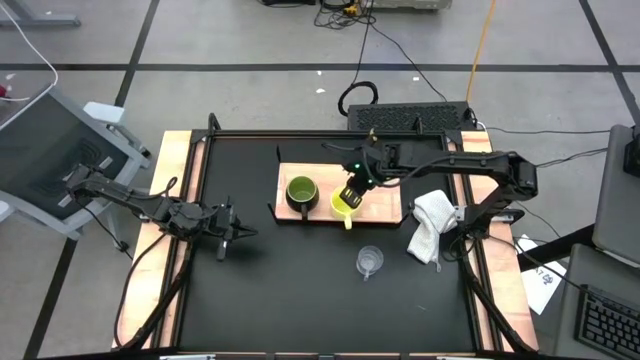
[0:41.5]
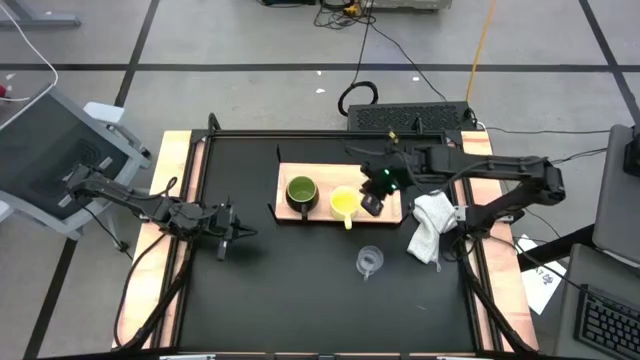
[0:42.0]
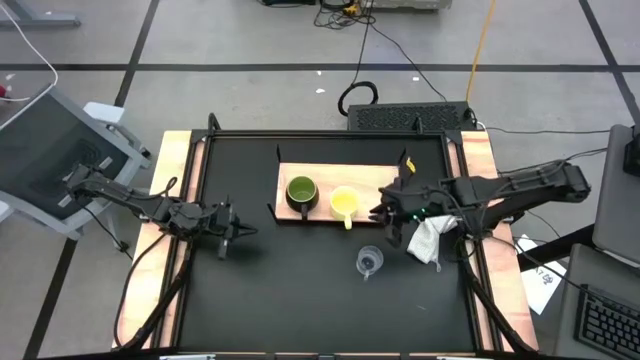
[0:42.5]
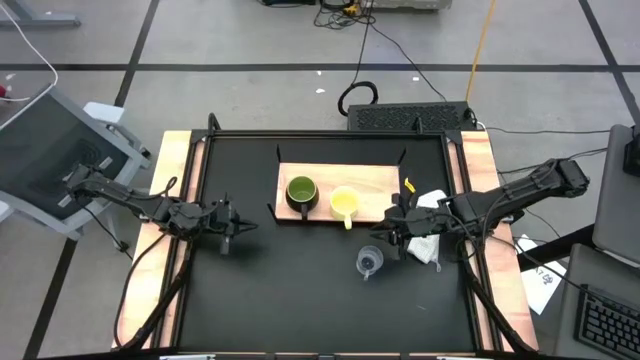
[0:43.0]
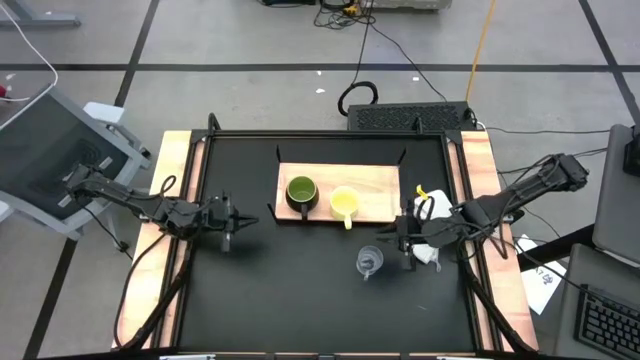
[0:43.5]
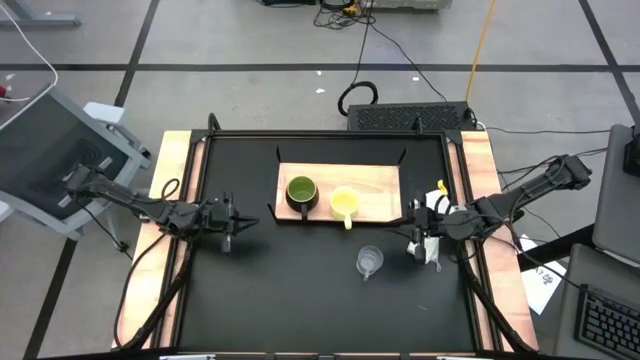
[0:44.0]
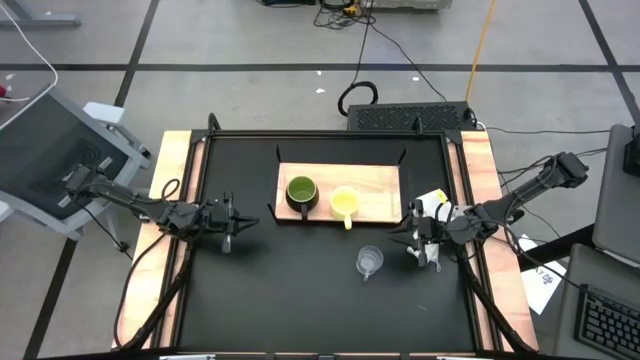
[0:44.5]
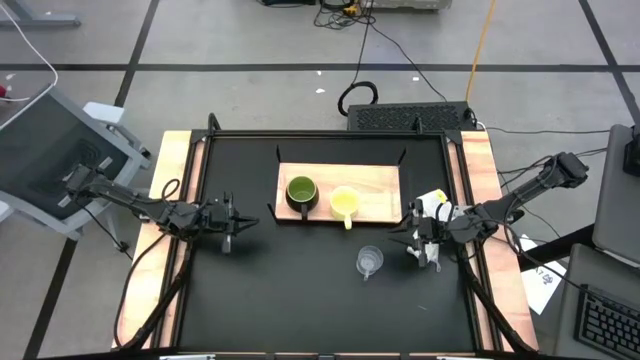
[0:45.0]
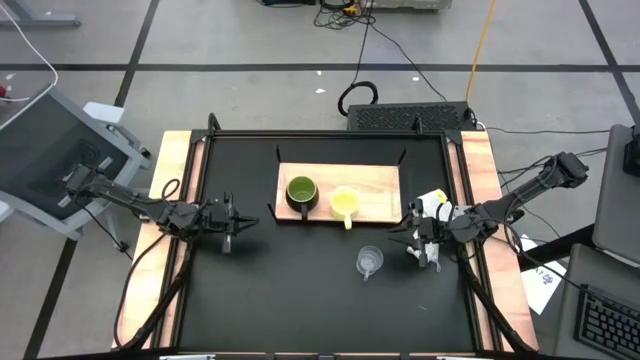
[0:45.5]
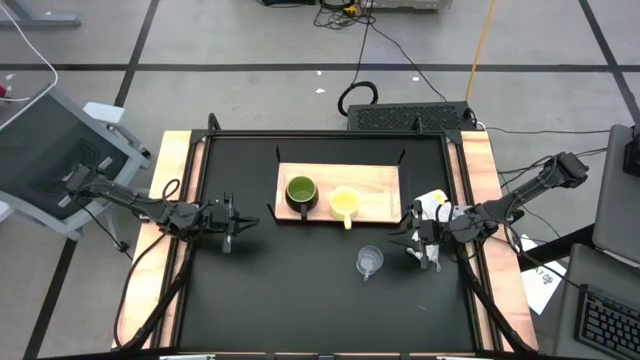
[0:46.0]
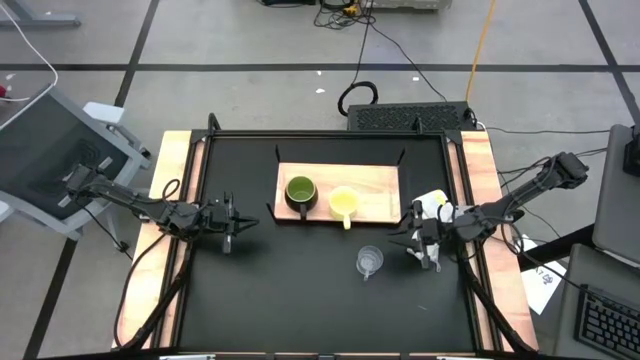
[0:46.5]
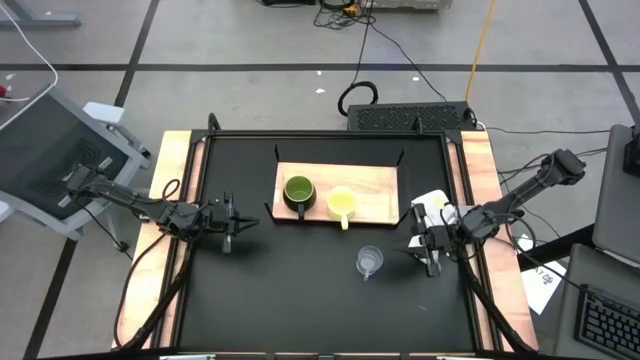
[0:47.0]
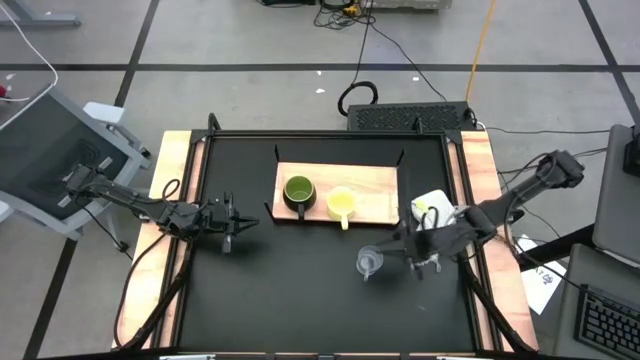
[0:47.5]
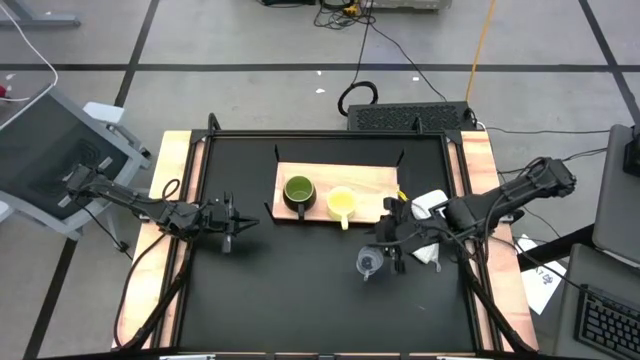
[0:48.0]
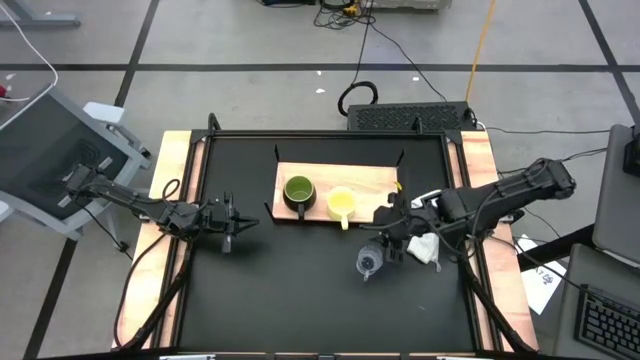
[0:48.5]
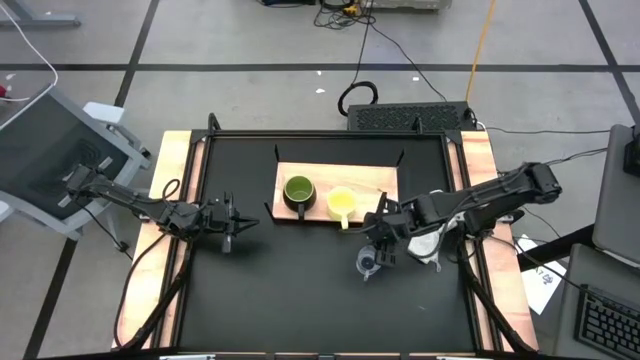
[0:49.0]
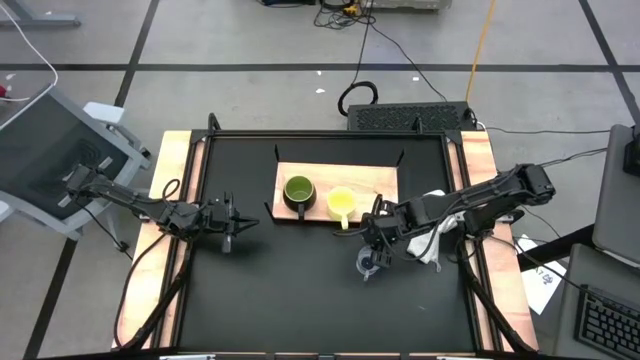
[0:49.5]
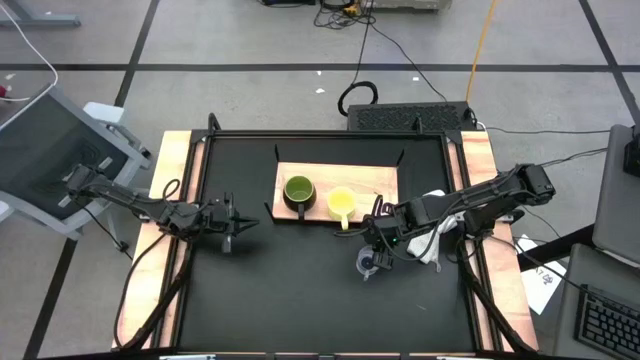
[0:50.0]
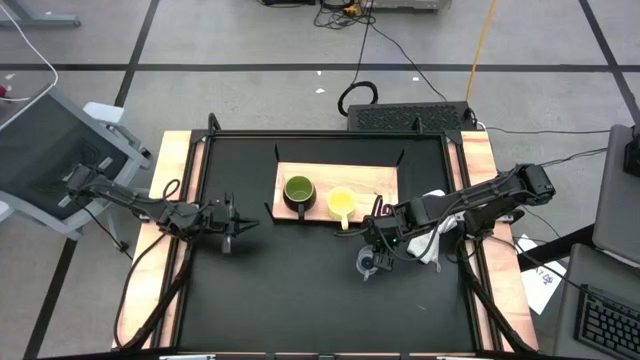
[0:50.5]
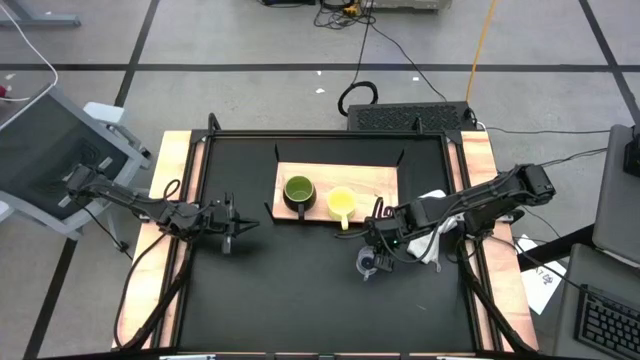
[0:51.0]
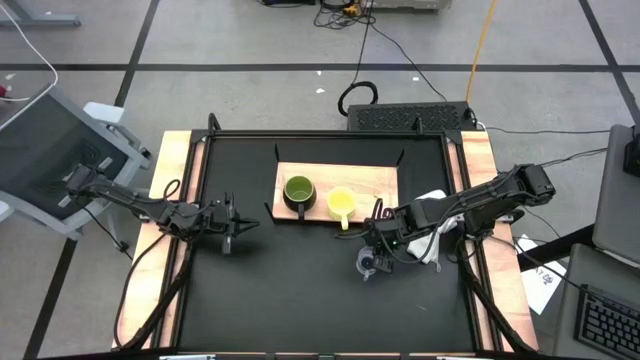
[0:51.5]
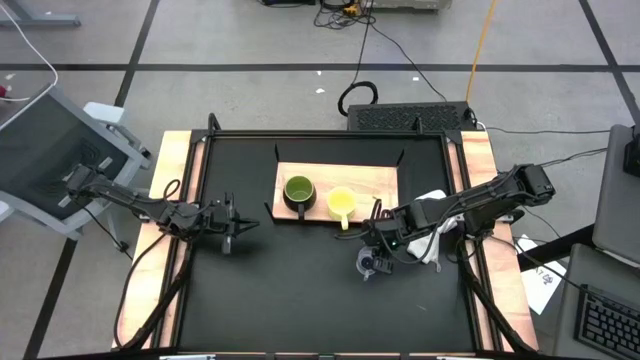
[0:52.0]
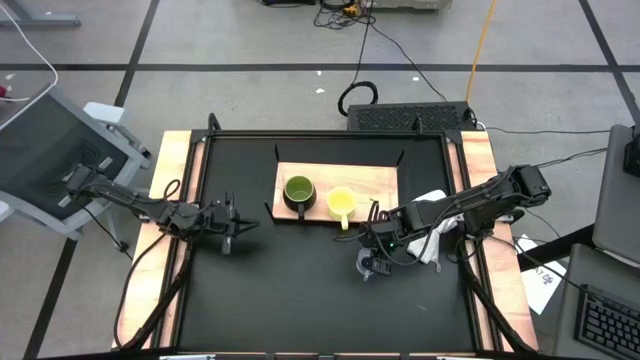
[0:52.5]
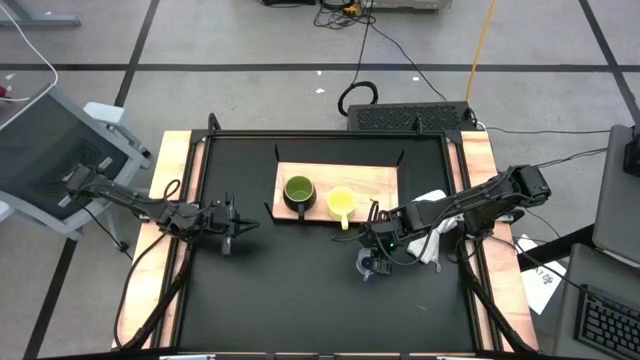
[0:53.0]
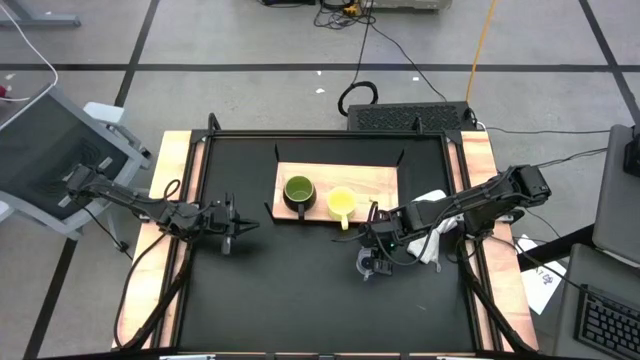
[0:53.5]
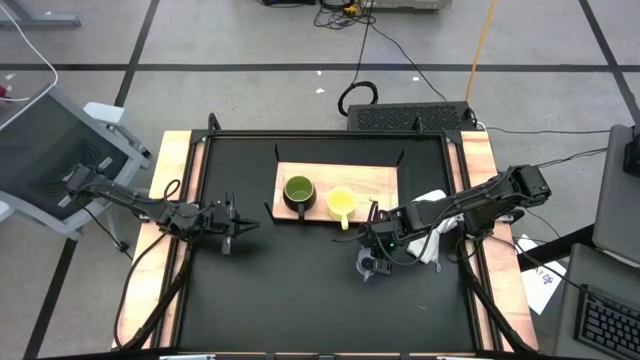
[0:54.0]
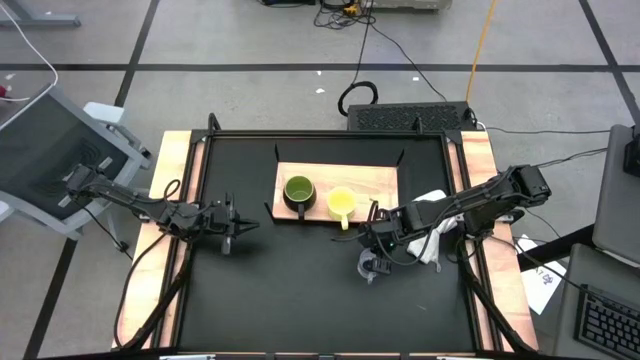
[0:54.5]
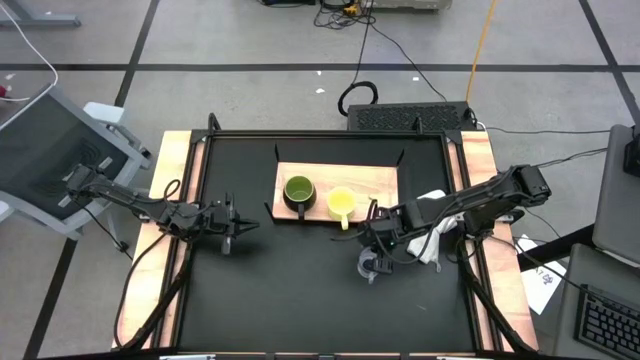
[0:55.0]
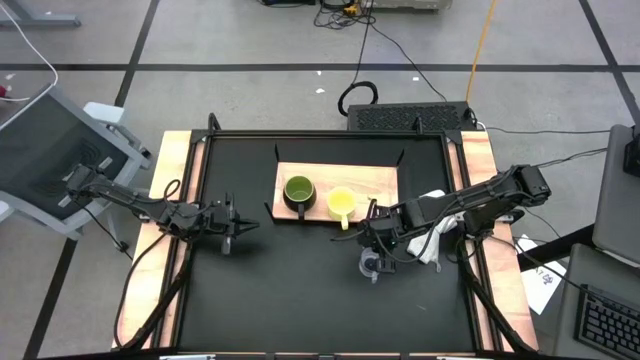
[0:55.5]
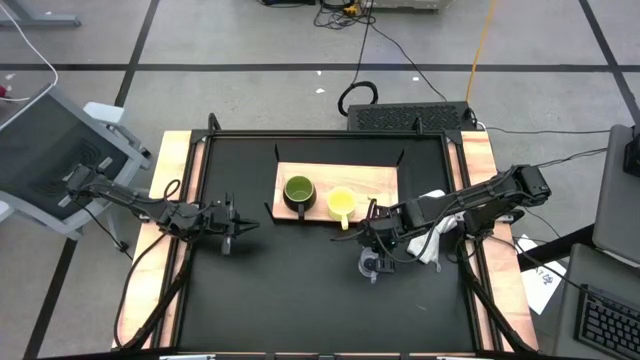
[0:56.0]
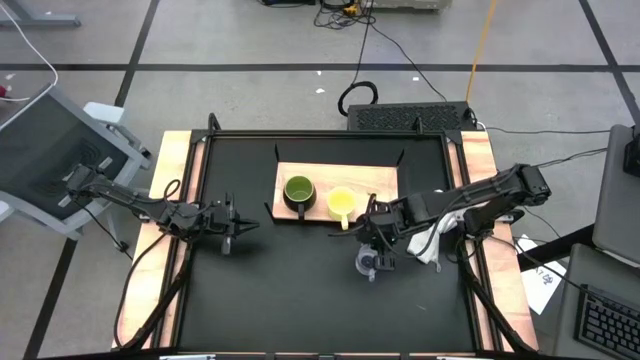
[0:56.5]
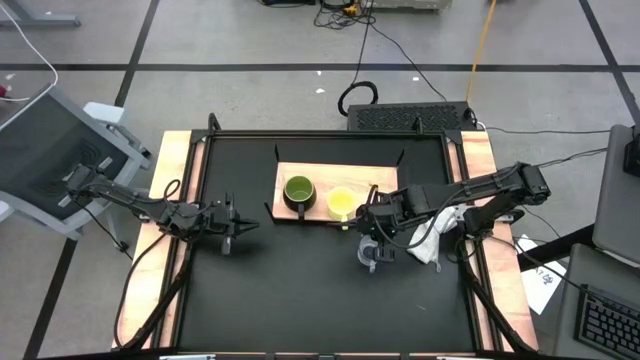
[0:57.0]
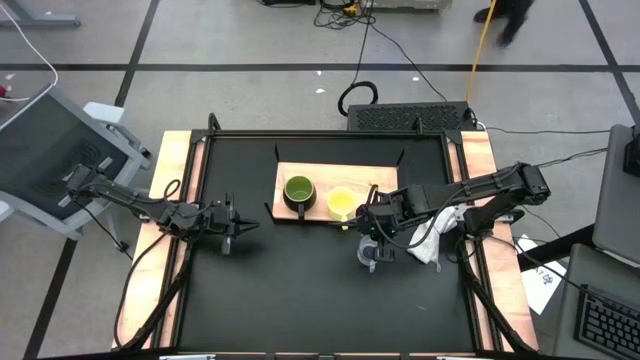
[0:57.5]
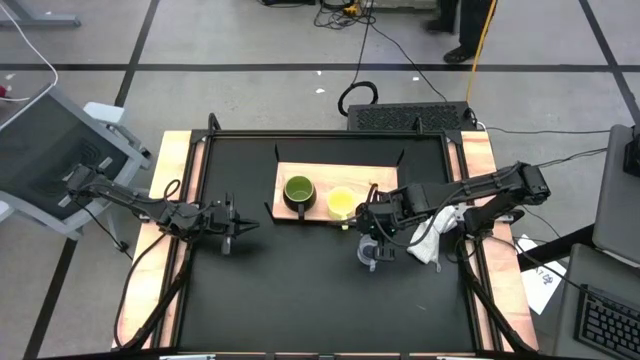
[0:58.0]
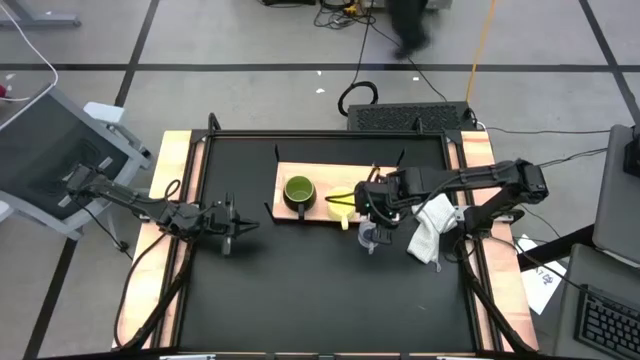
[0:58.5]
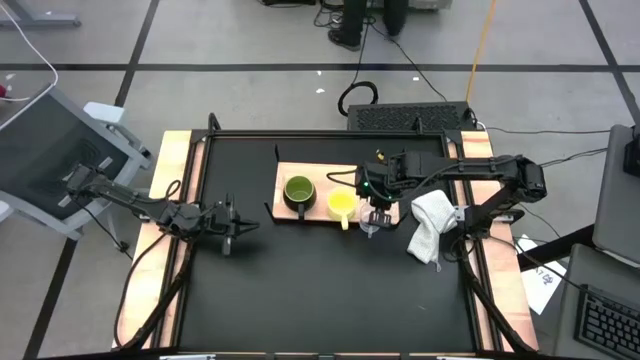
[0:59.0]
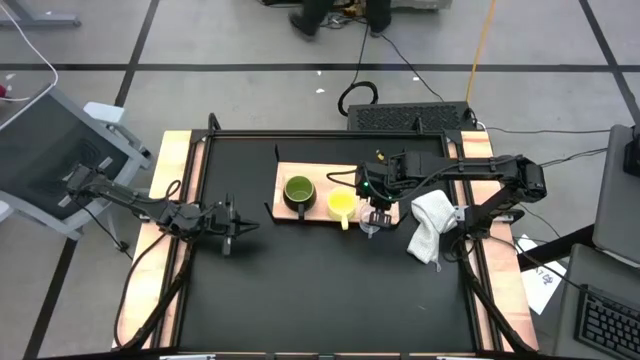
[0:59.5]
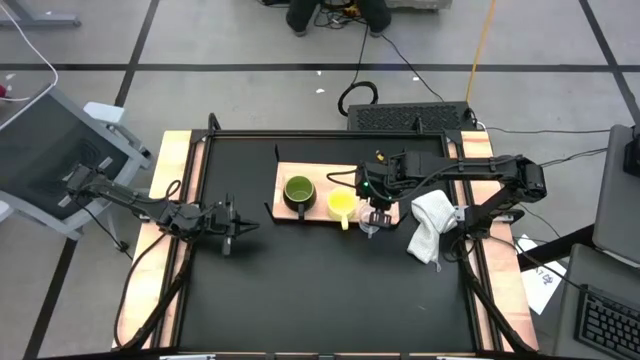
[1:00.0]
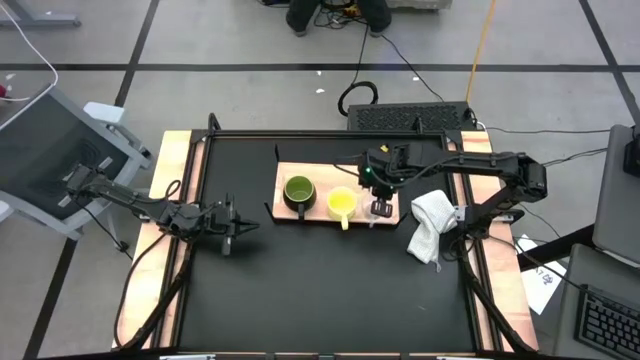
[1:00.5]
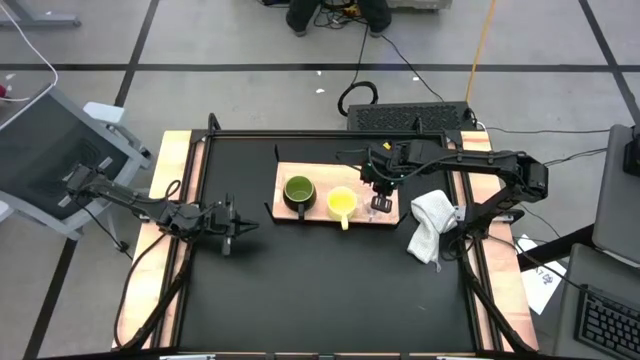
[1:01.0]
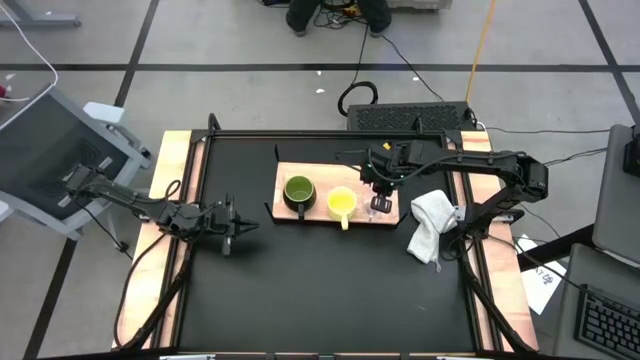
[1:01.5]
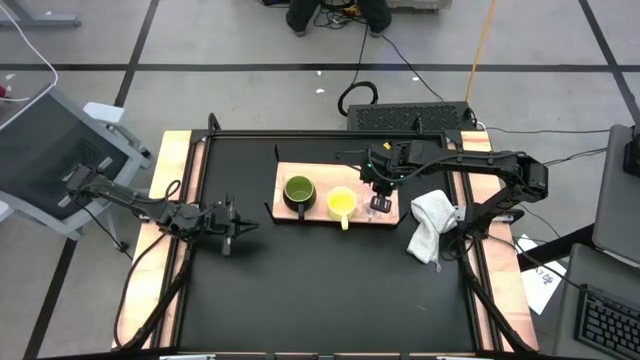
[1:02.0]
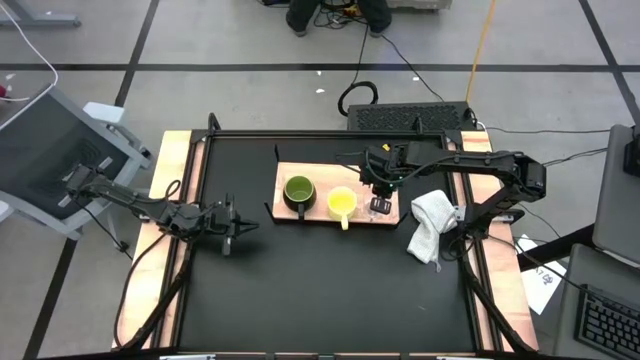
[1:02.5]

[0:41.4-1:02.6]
Task: Stack small to large cups/mugs on shelf
Put the transparent mug on the shelf
